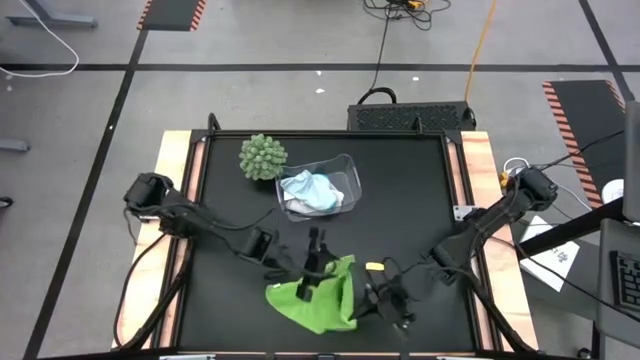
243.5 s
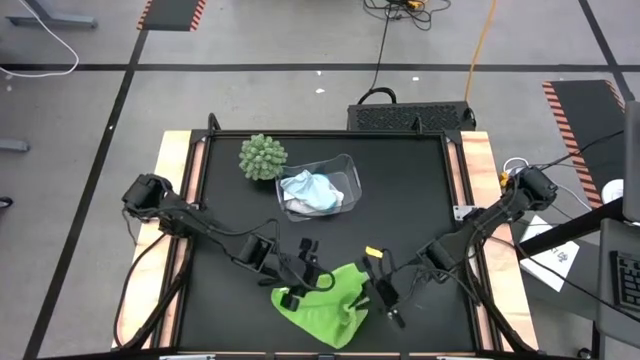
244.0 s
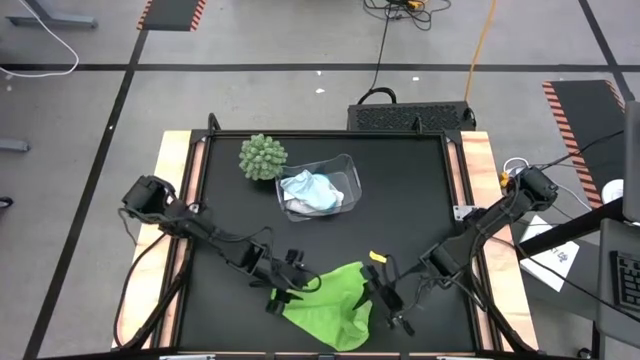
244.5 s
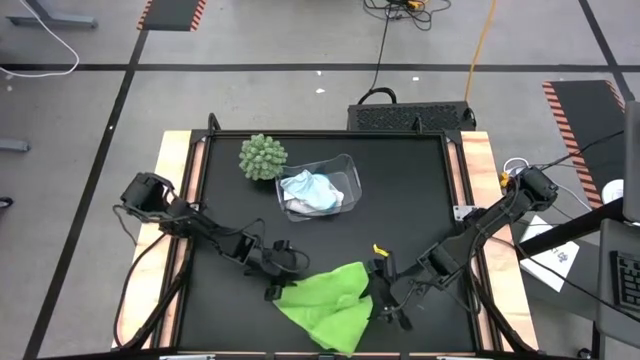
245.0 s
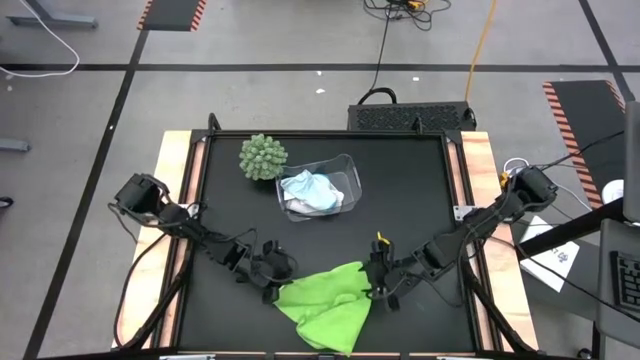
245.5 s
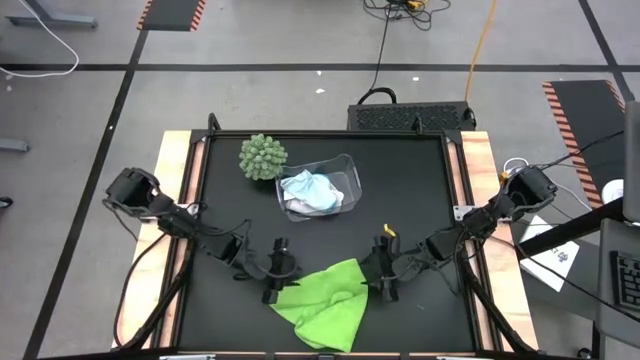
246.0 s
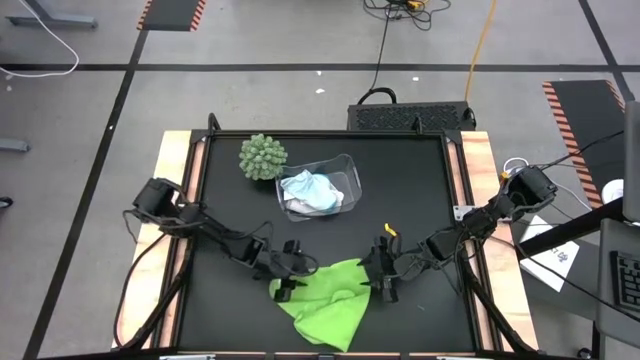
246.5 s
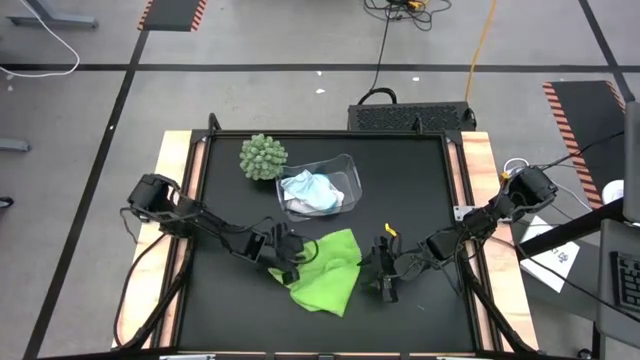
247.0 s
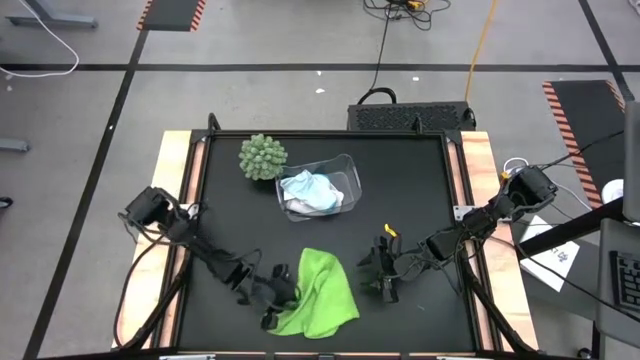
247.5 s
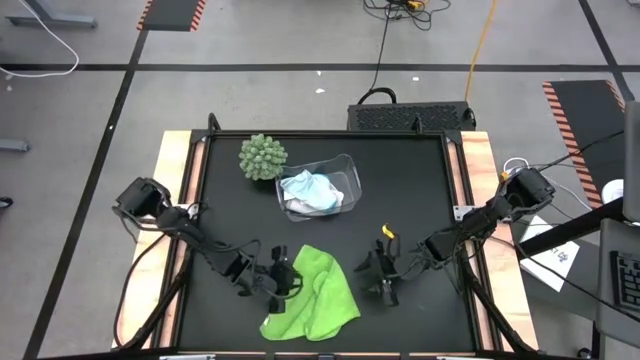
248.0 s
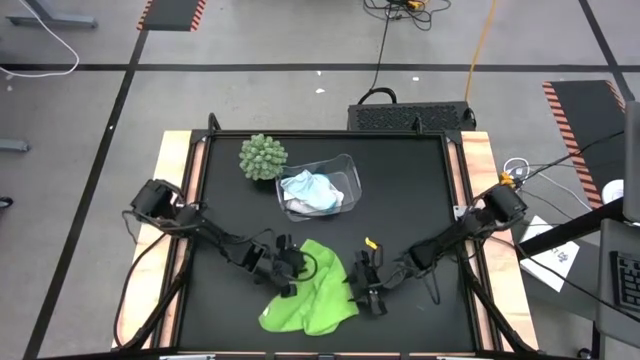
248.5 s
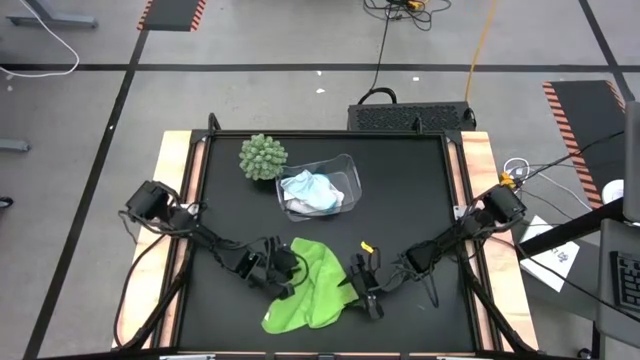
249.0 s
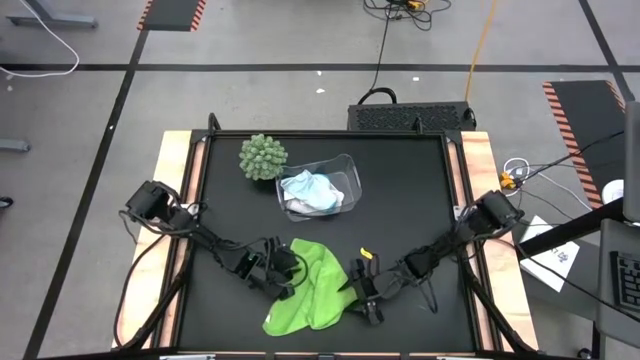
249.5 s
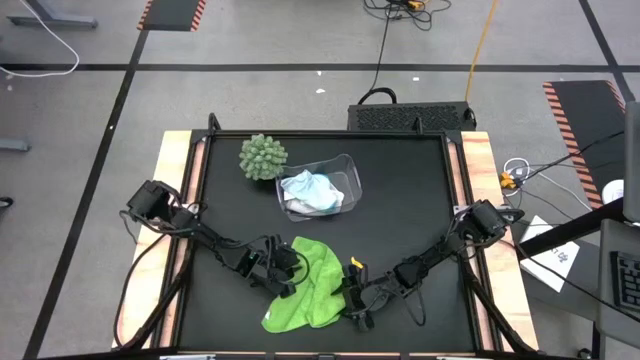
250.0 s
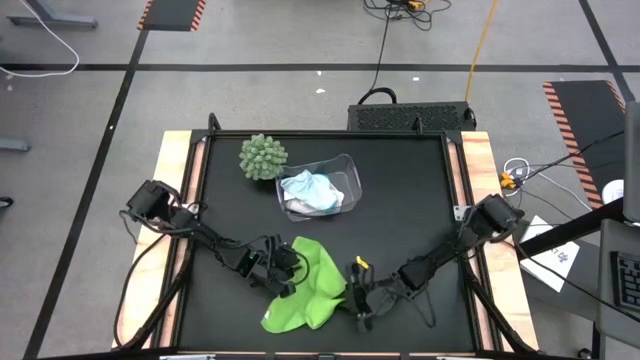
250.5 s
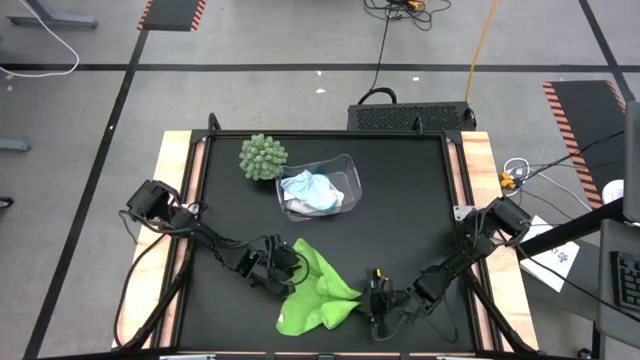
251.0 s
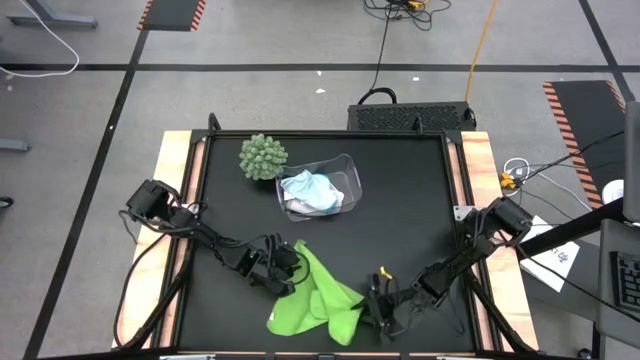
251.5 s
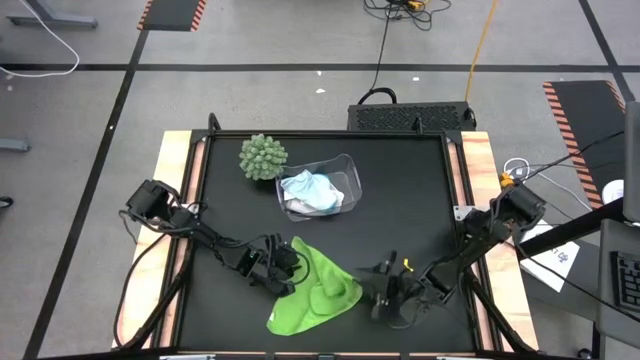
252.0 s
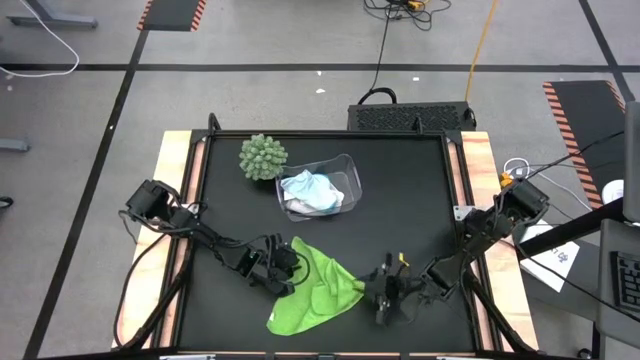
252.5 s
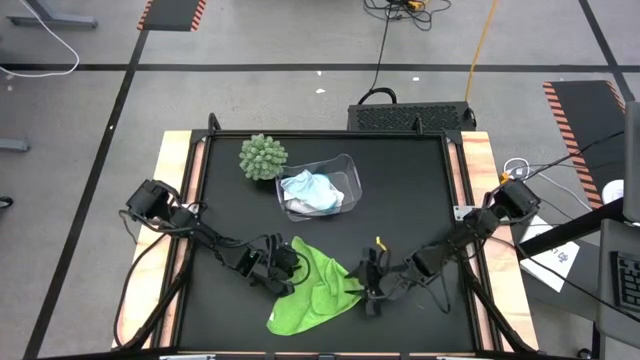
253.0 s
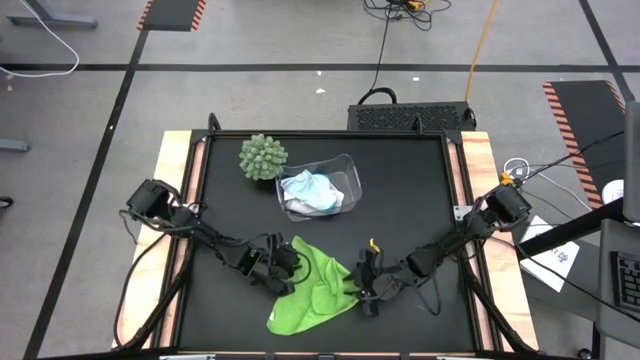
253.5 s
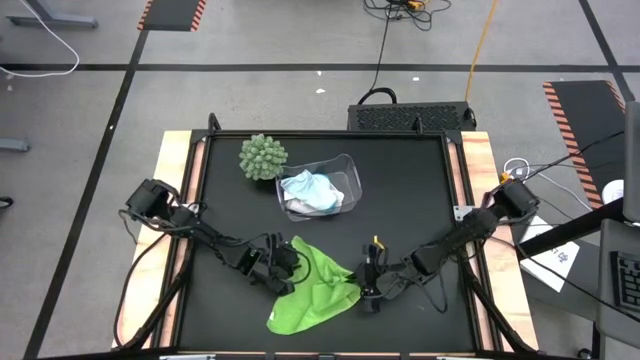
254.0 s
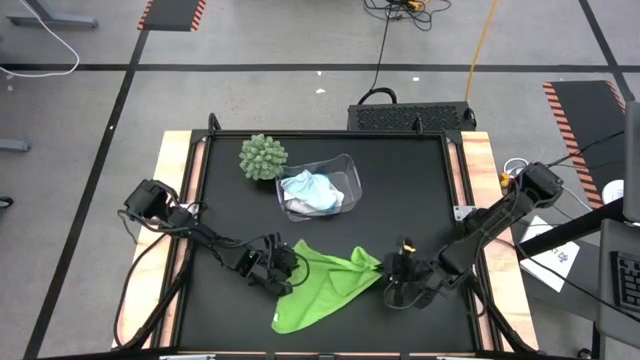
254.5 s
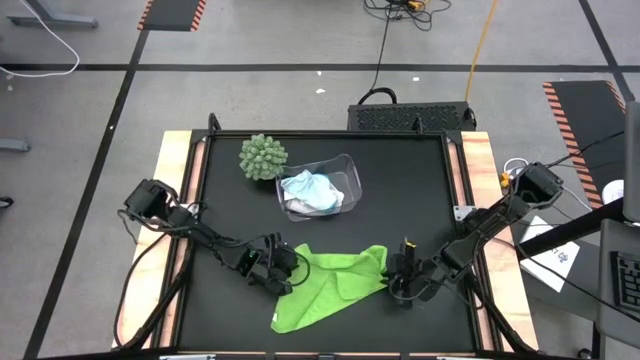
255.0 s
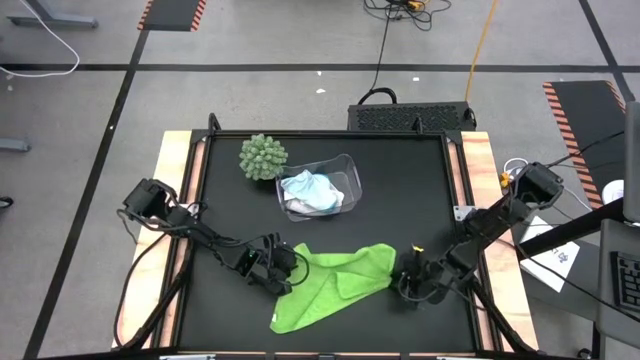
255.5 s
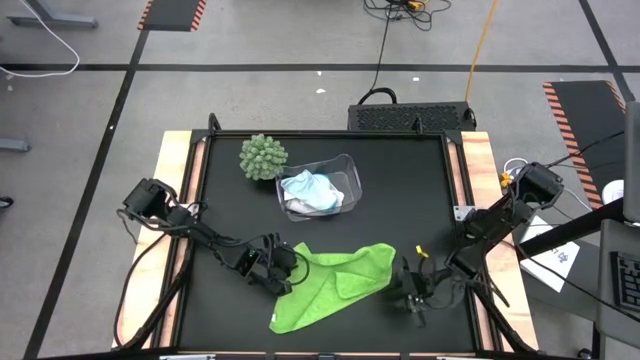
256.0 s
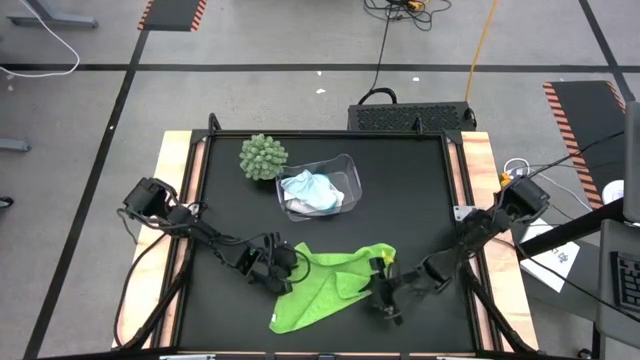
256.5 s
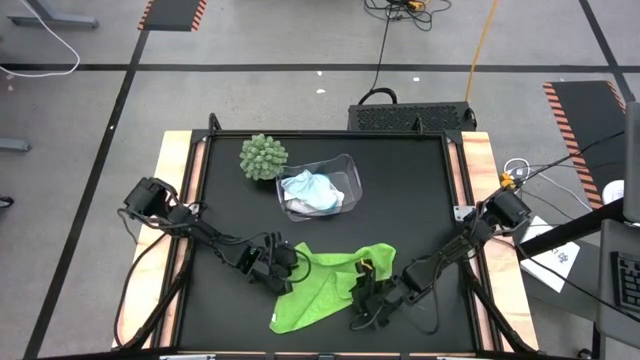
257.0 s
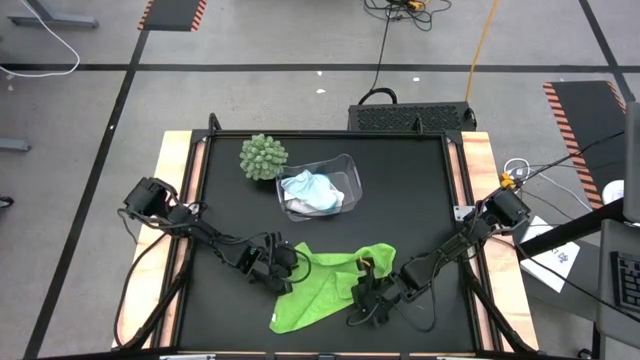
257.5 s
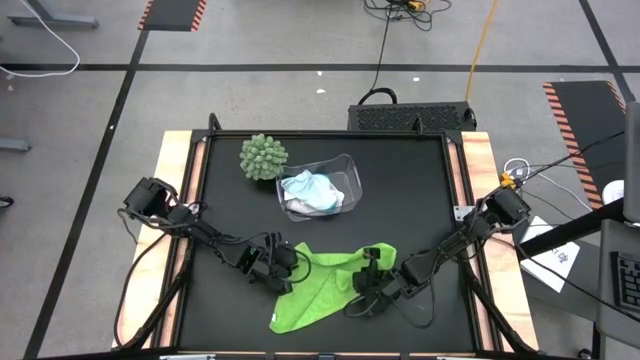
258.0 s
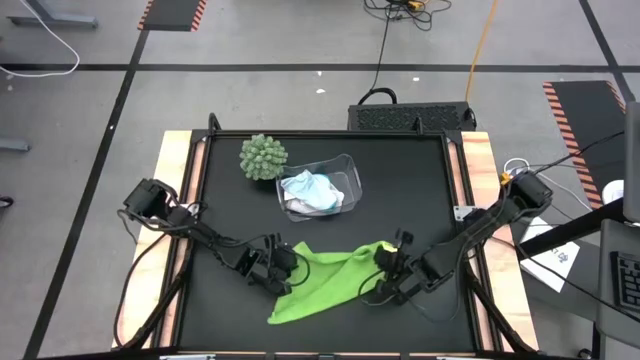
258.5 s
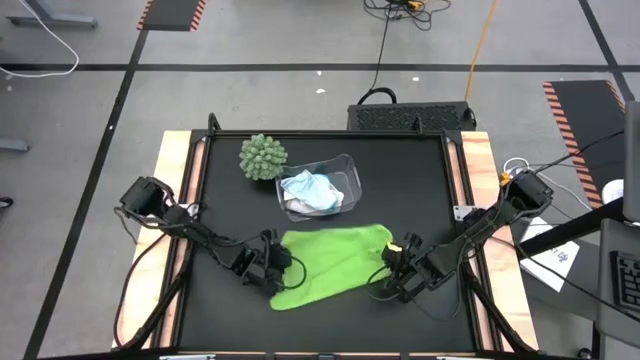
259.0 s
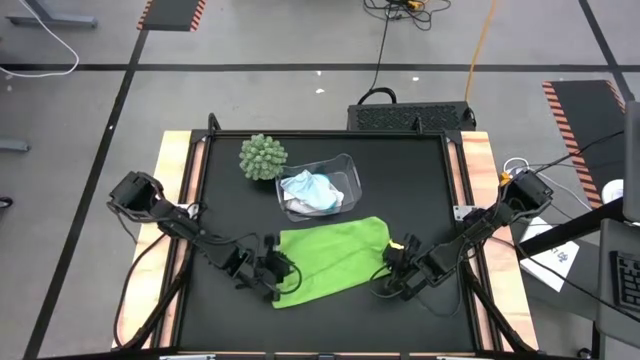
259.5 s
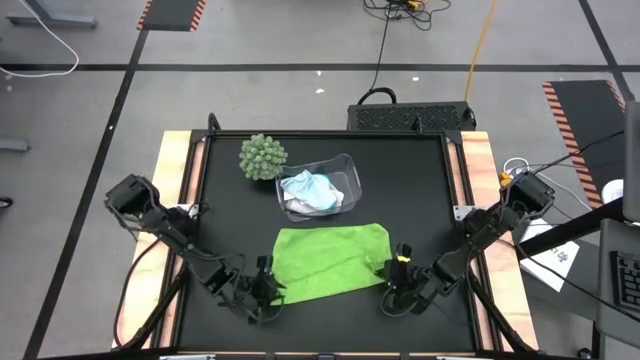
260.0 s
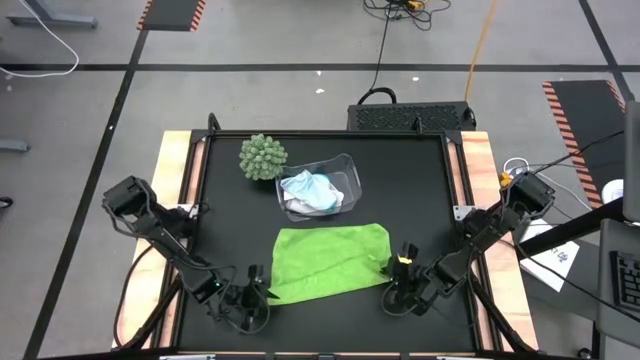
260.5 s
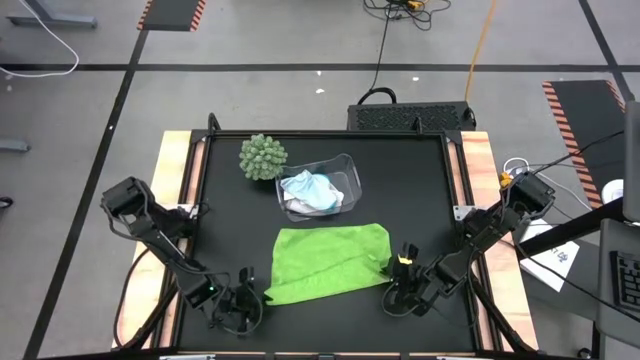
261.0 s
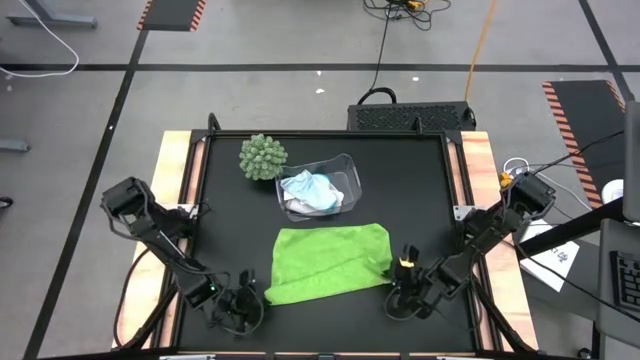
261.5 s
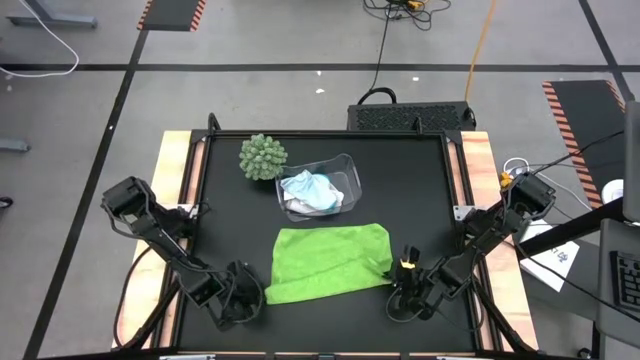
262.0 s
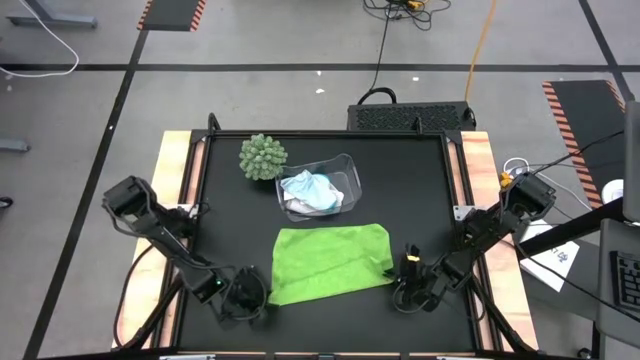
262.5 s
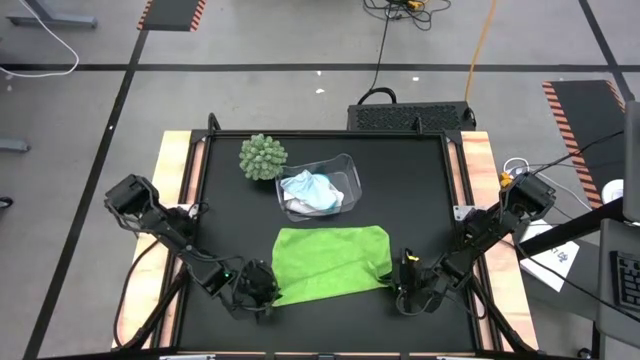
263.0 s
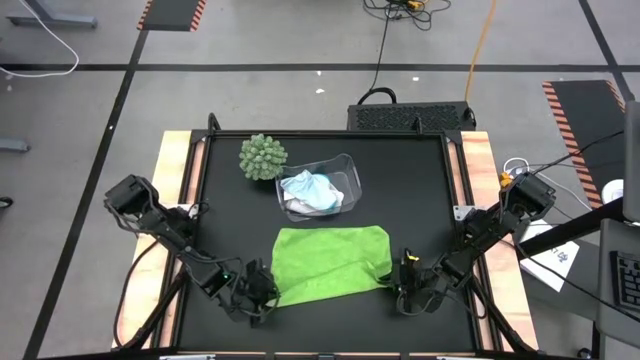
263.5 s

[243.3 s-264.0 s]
Task: Fold microfiber towels
Fold the green towel

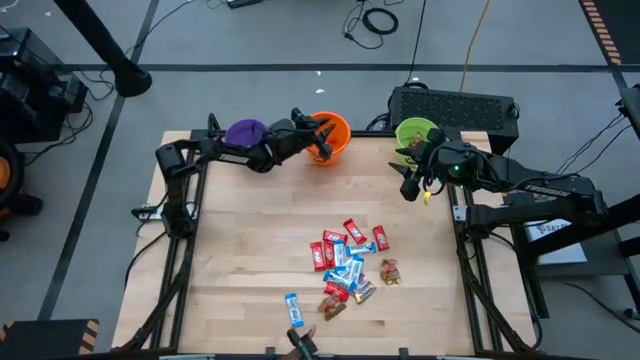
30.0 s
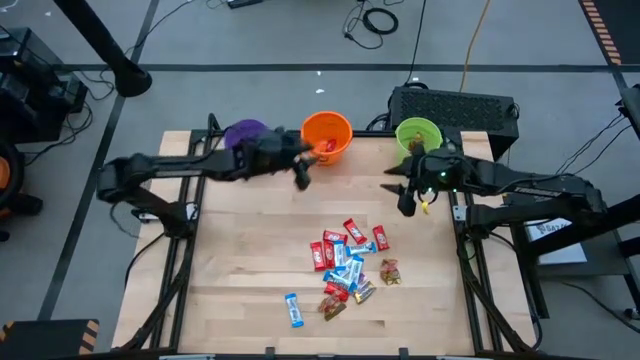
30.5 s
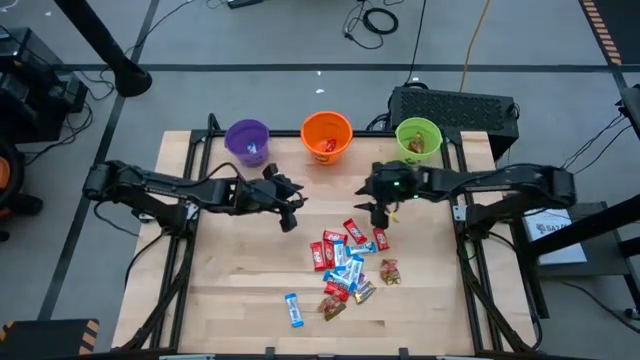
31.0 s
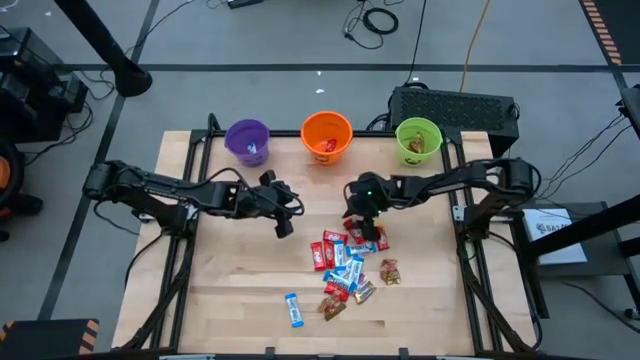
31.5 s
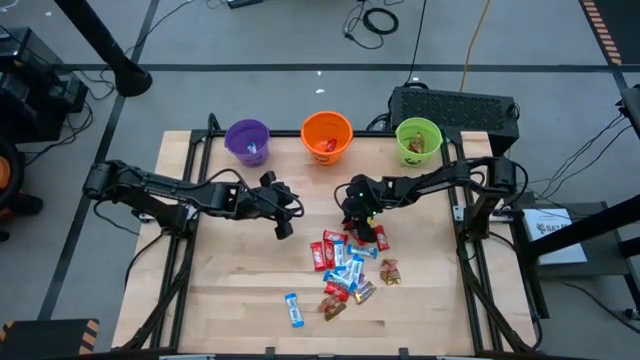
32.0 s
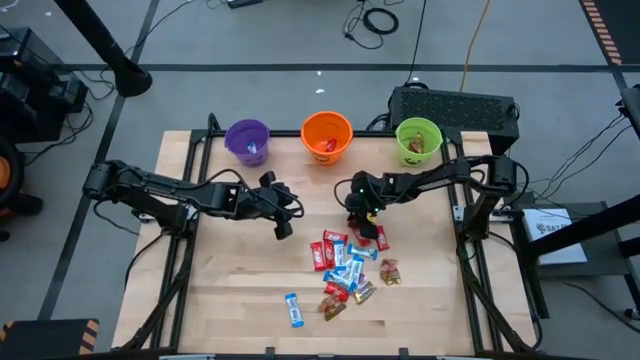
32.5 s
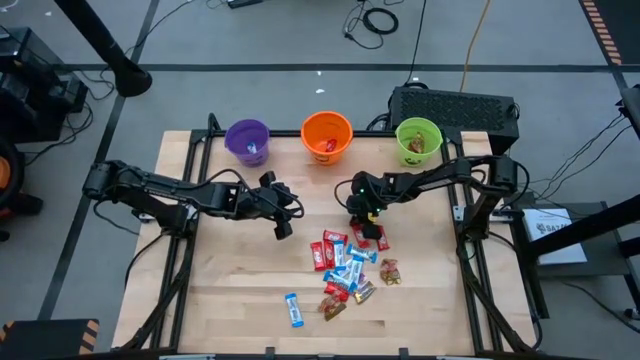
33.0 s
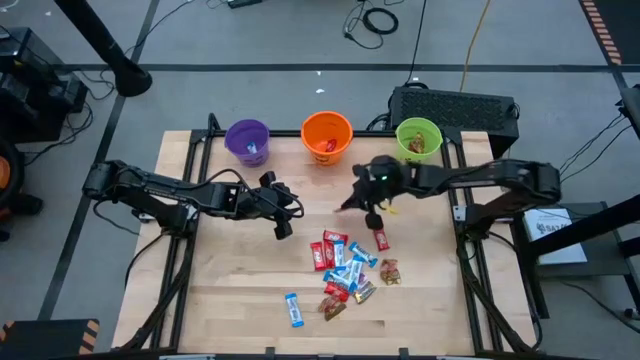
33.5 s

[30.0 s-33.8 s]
Task: Sort candy by brand, put in halloween buckets
Put the red chocolate into the orange bucket
